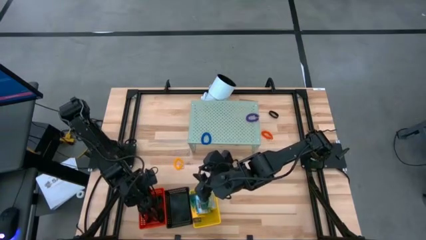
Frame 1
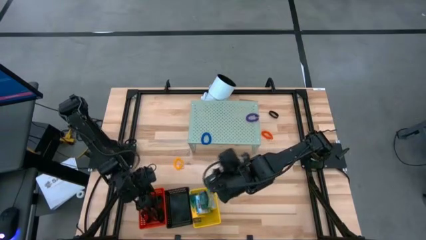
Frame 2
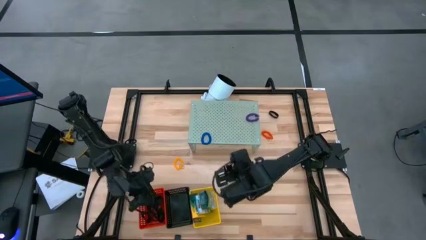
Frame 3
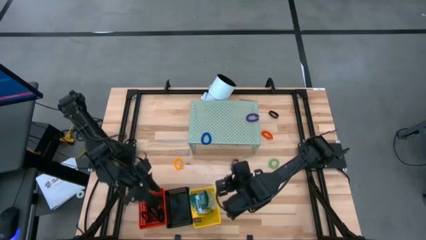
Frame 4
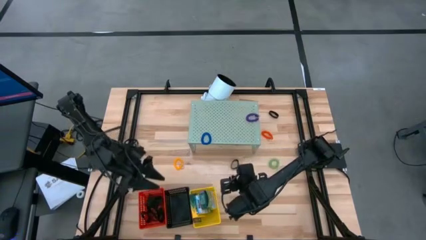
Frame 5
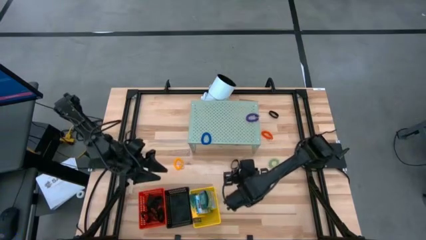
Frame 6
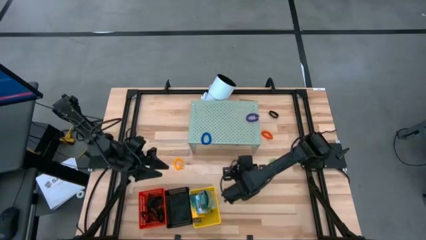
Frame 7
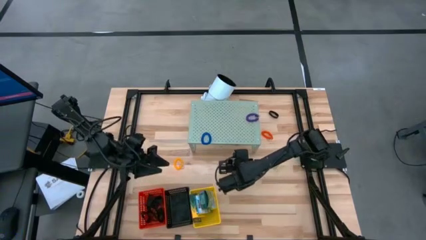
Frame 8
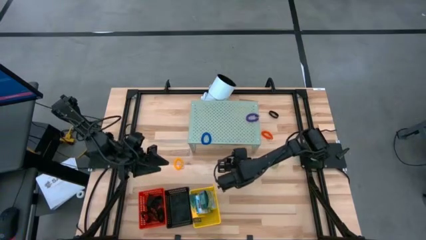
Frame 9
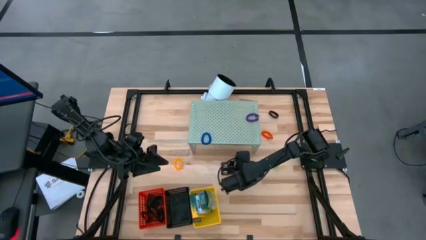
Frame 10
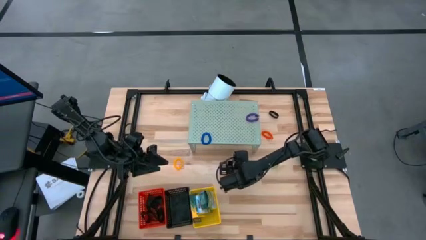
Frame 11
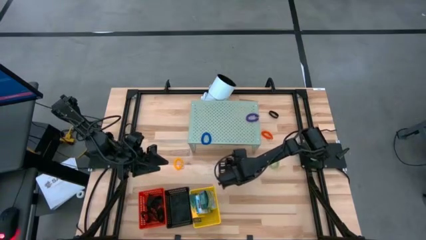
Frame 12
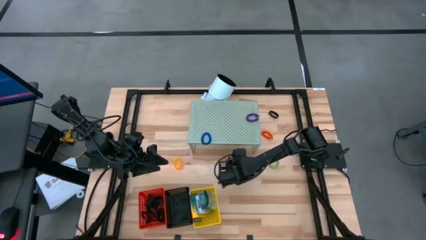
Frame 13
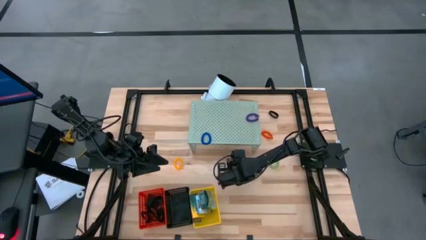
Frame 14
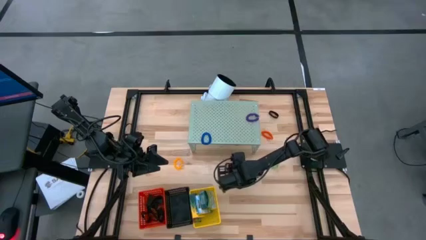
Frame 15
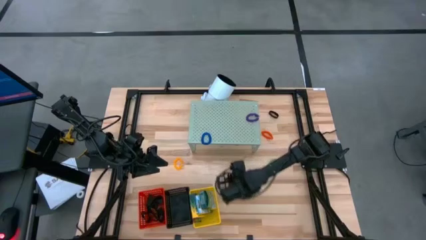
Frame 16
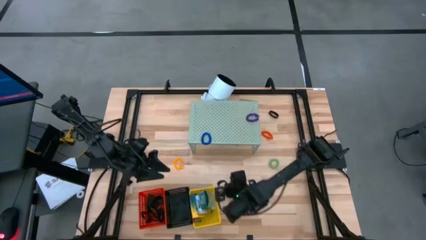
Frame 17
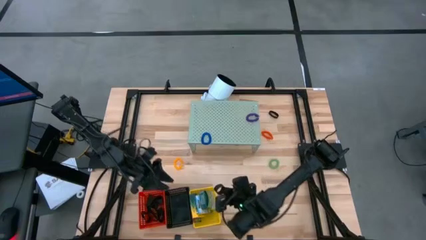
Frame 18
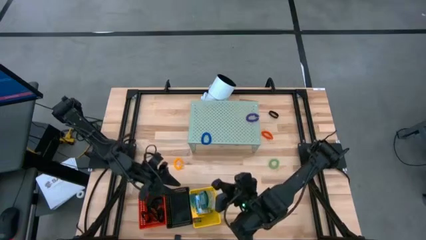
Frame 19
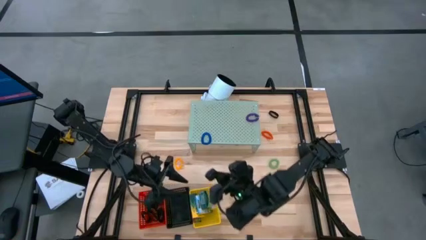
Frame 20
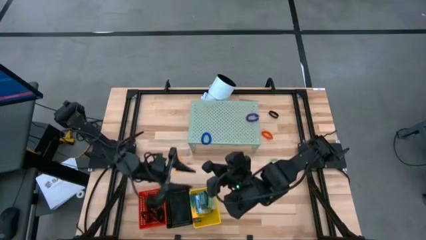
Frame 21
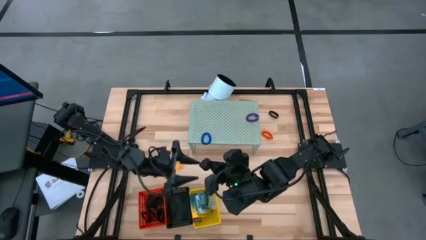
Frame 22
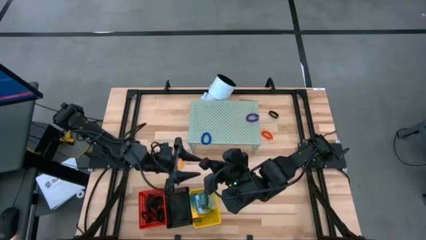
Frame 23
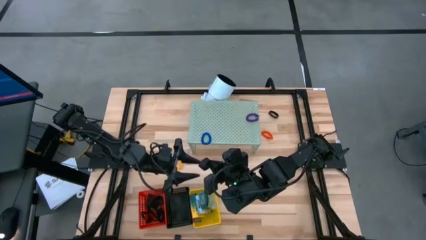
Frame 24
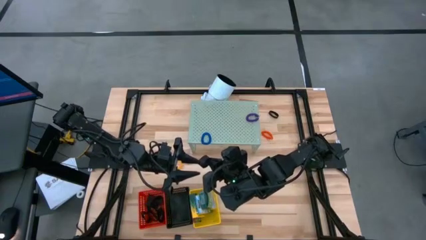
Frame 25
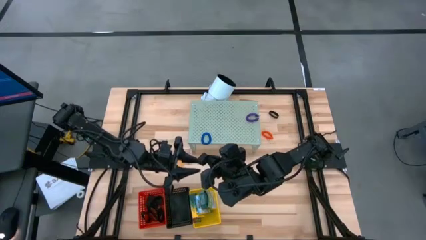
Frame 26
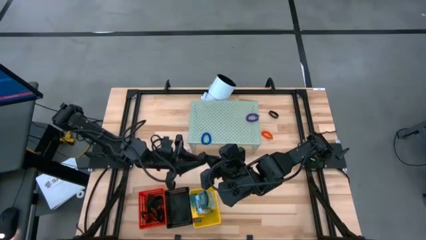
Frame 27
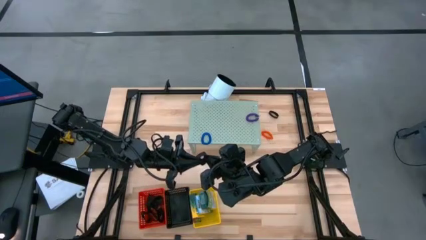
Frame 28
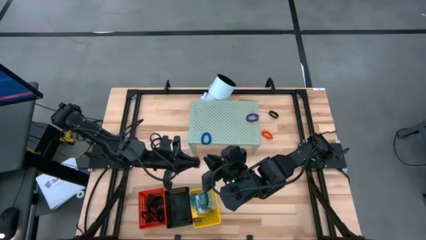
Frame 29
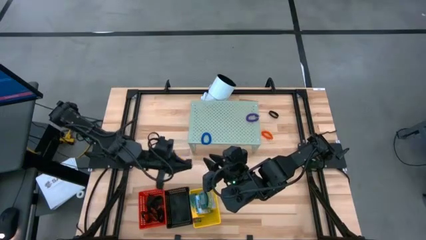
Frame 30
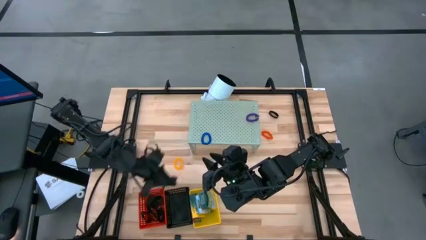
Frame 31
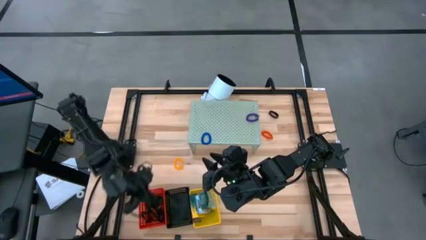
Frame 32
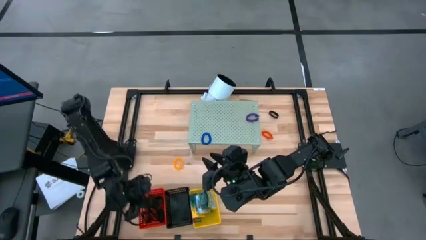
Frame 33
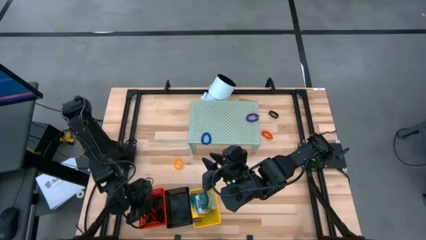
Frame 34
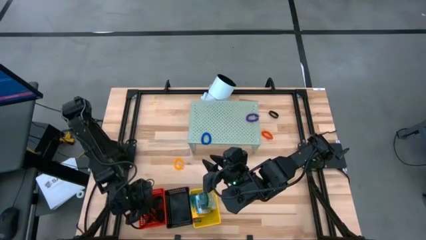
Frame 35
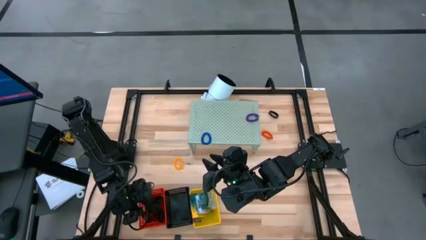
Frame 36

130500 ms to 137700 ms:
Task: Pick & Place Office Desk Supplies
Put the black rubber band into the red bin

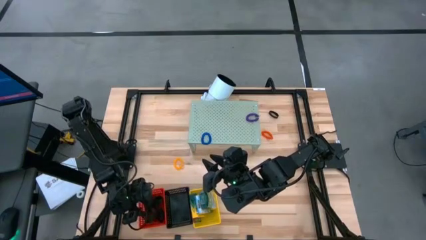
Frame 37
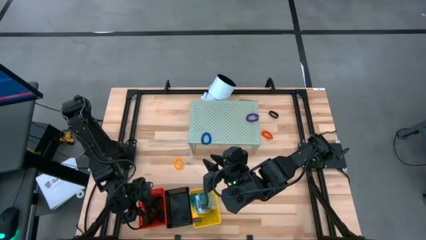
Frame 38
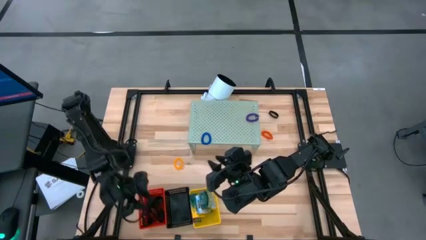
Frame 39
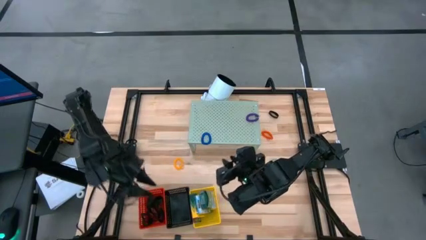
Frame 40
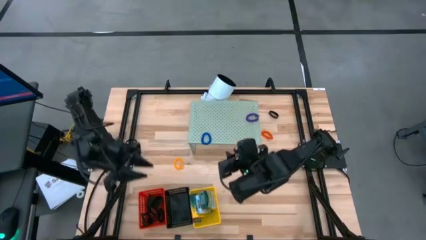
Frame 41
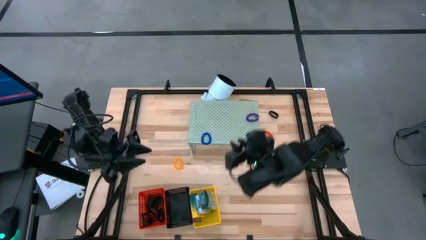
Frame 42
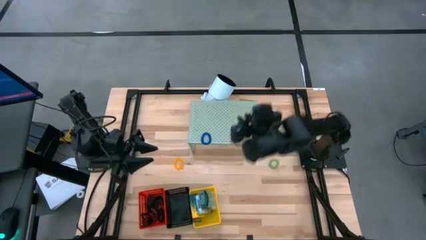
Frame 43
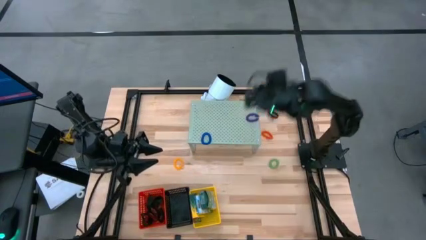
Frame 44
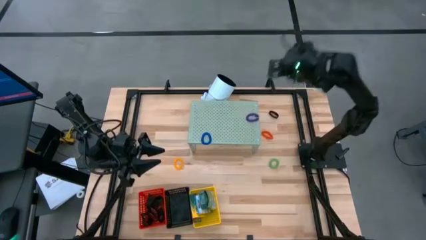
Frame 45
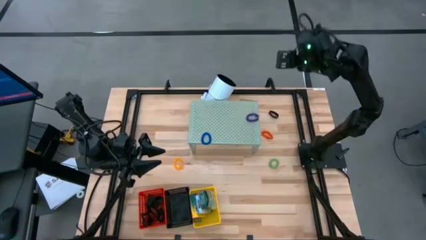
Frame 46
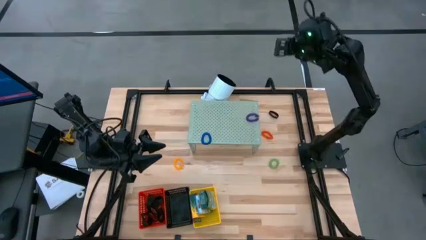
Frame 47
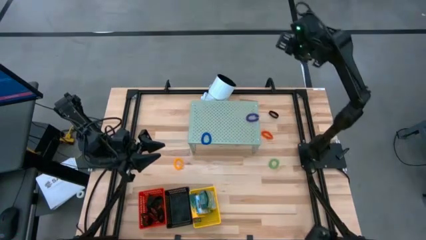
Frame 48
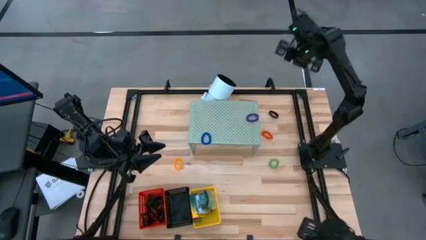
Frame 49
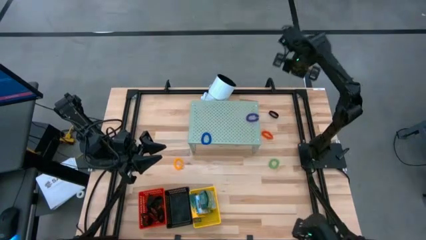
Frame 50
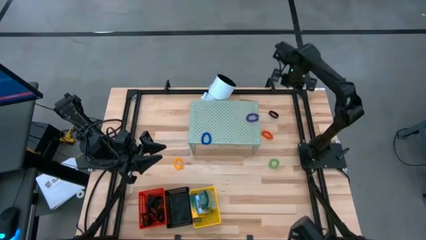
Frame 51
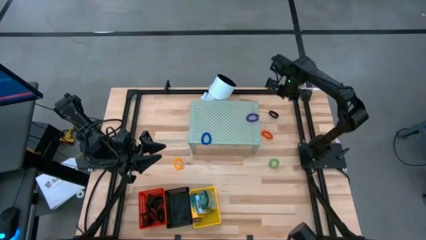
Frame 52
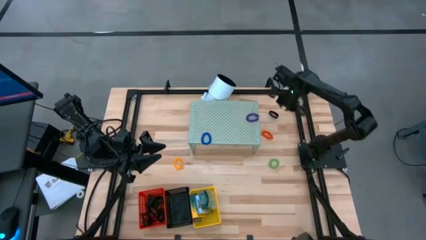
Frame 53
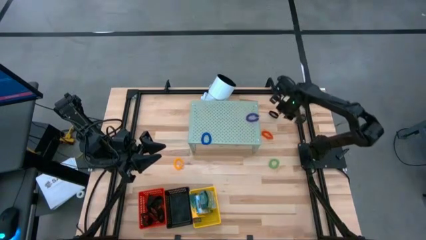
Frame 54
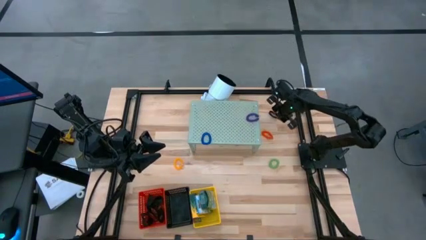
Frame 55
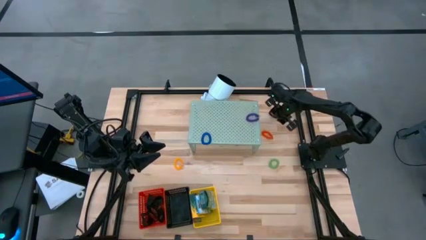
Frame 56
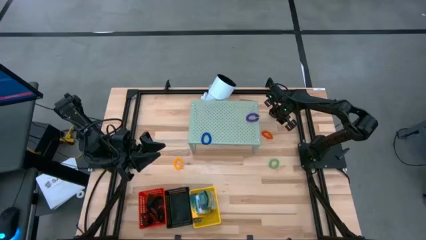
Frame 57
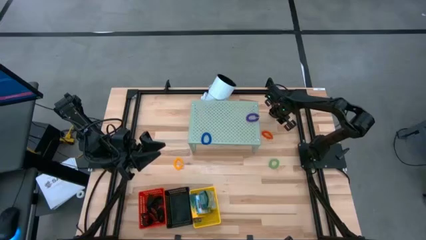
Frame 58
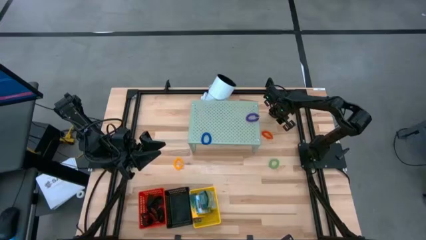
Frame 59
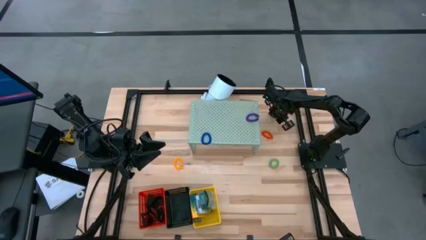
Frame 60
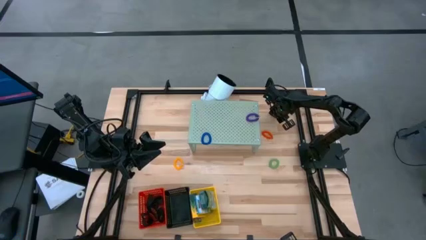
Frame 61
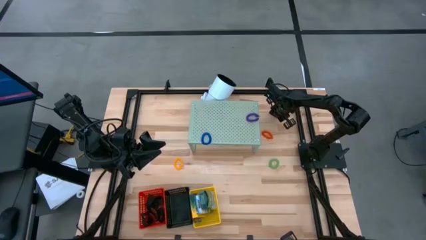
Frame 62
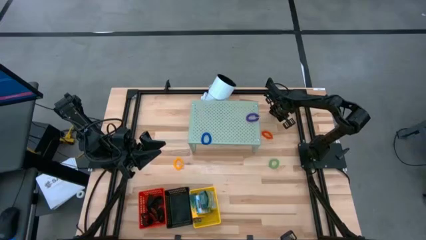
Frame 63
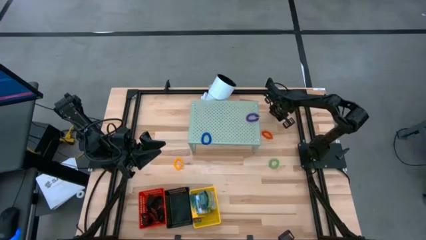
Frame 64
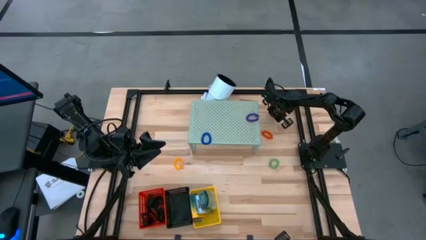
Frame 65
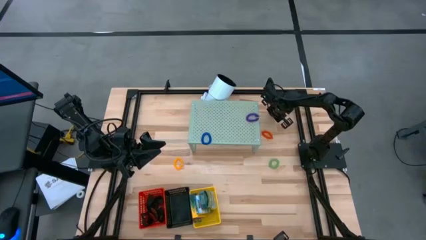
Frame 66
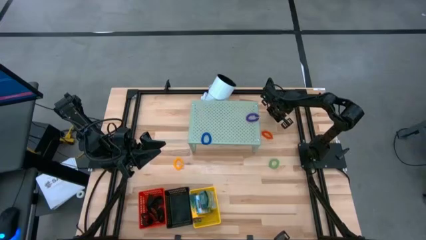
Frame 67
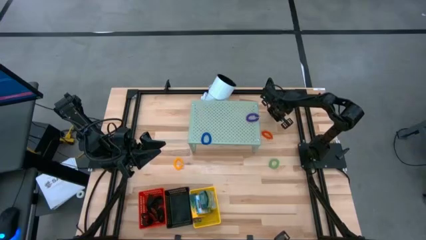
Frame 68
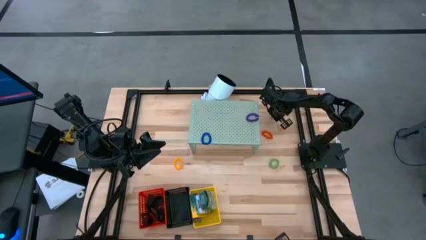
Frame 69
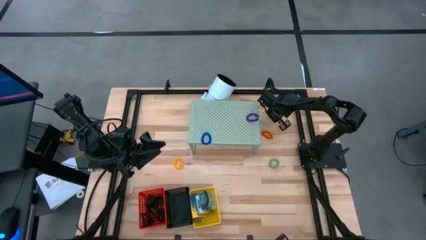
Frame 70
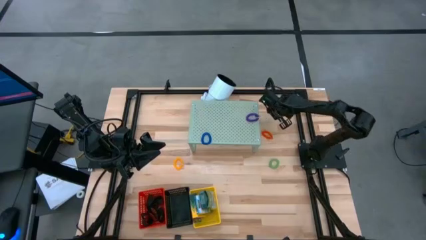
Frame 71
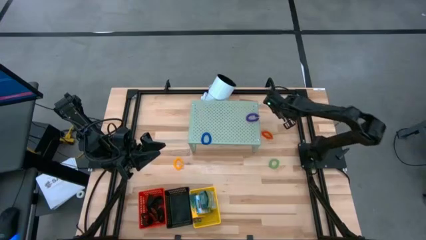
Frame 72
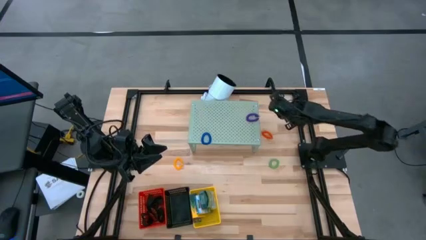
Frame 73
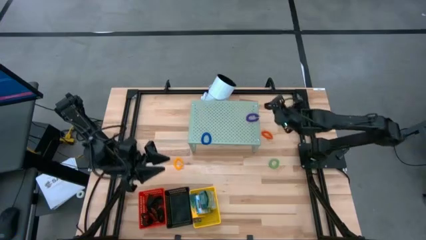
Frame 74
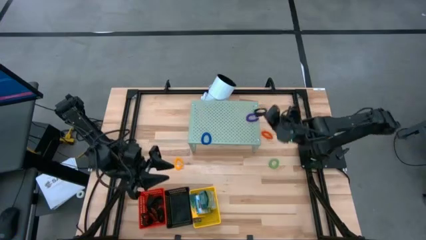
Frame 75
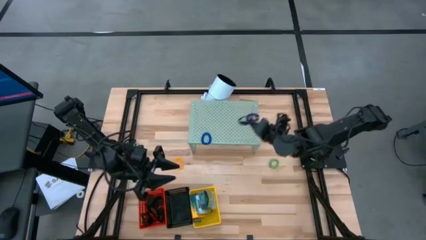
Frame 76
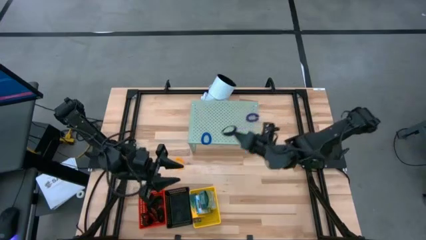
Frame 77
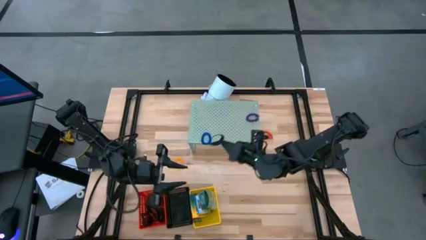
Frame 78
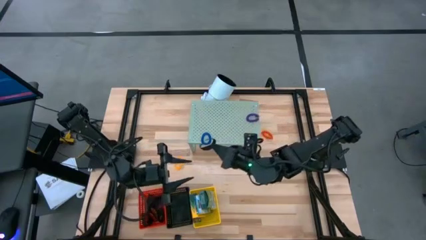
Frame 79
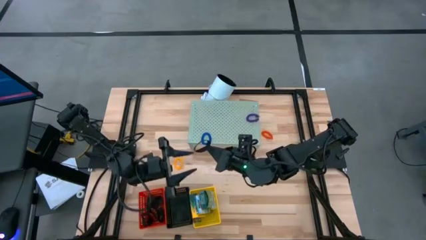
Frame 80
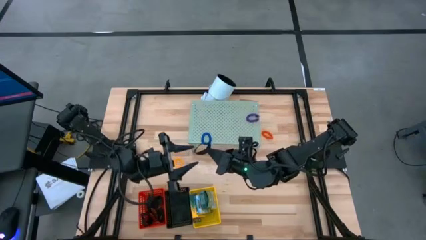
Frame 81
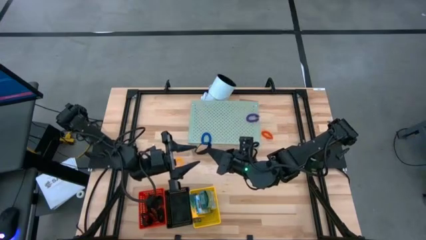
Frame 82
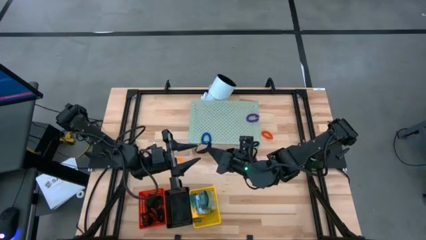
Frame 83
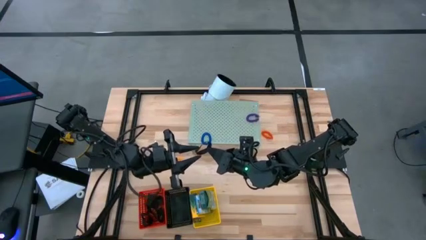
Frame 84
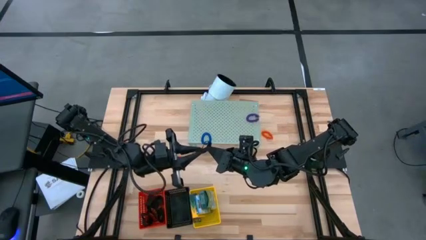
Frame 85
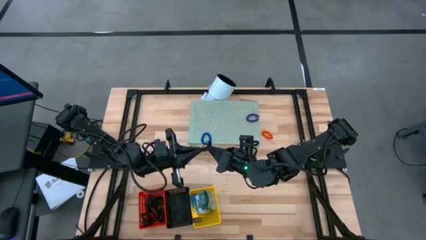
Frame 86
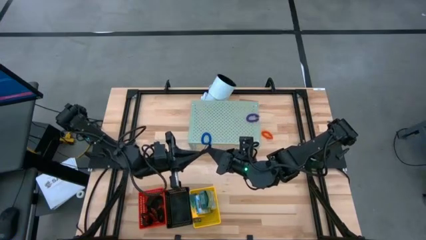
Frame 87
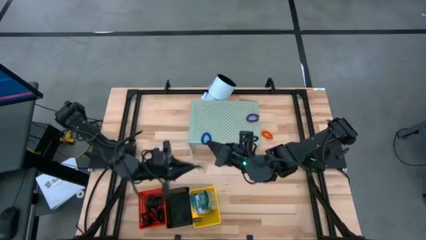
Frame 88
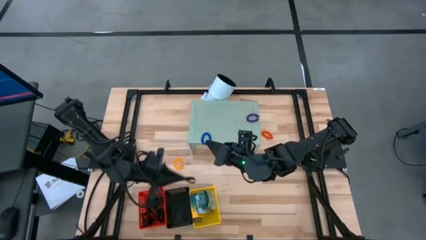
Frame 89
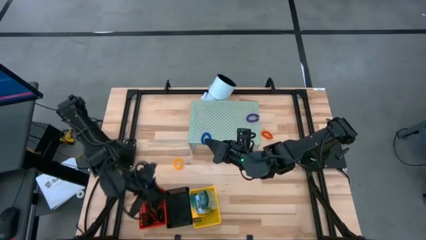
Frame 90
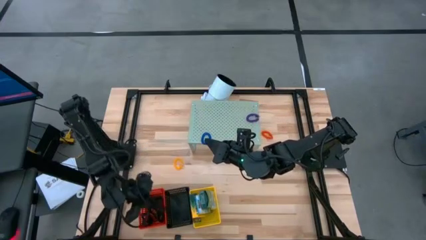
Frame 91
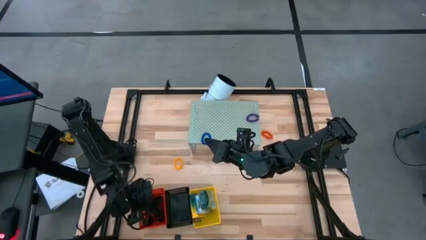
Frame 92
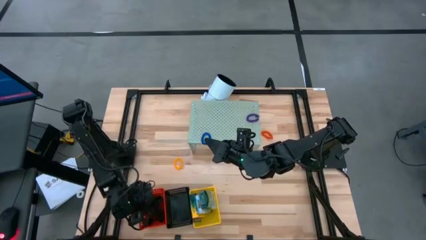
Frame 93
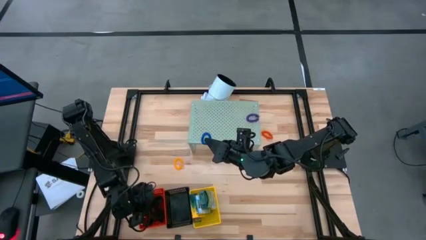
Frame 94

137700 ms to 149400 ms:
Put the black rubber band into the red bin
